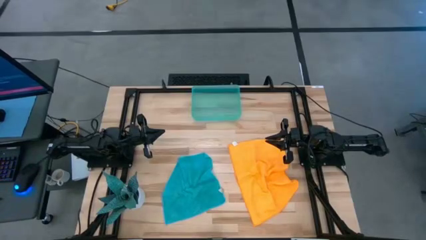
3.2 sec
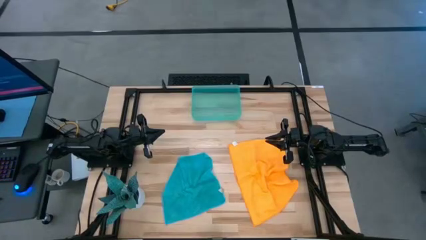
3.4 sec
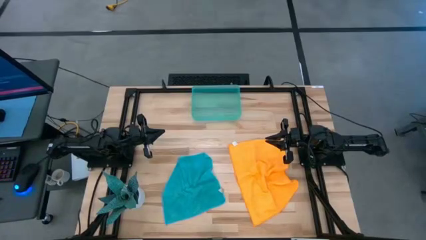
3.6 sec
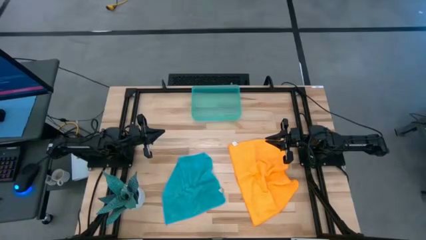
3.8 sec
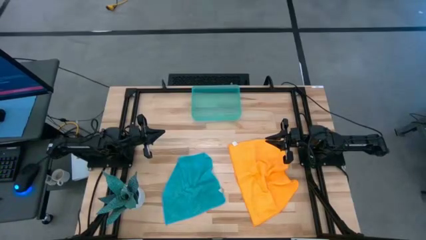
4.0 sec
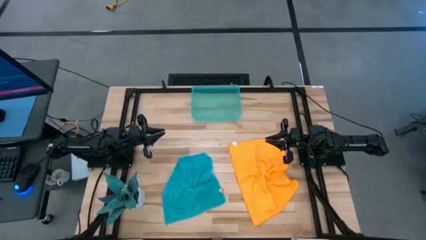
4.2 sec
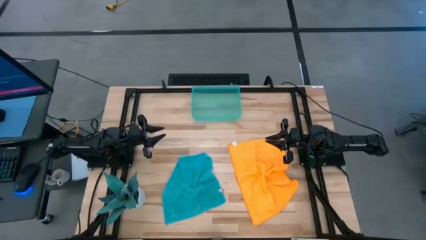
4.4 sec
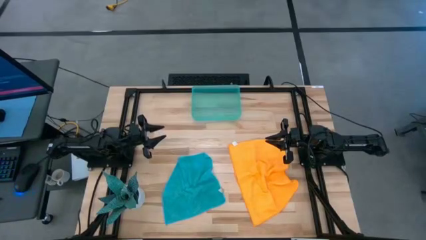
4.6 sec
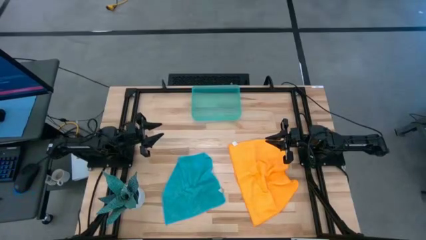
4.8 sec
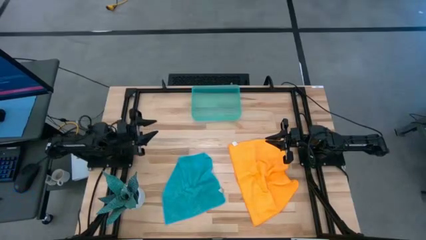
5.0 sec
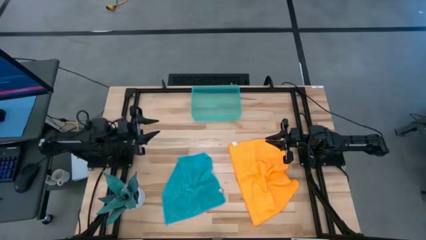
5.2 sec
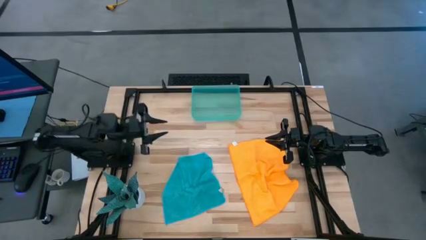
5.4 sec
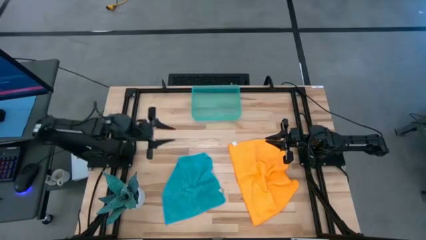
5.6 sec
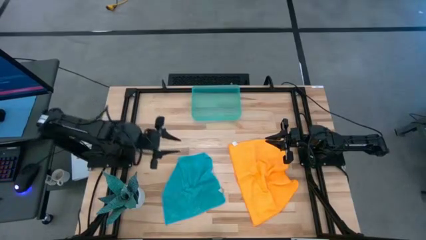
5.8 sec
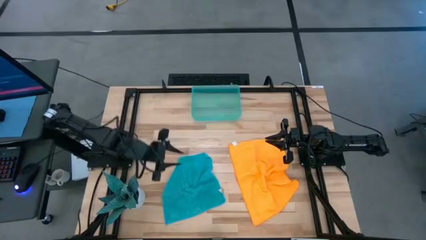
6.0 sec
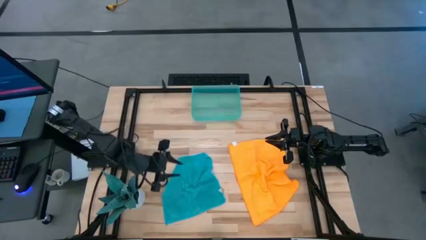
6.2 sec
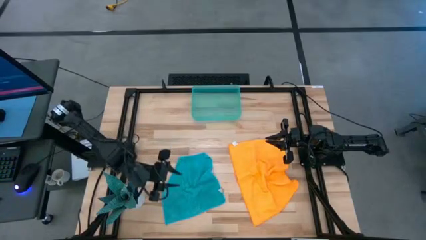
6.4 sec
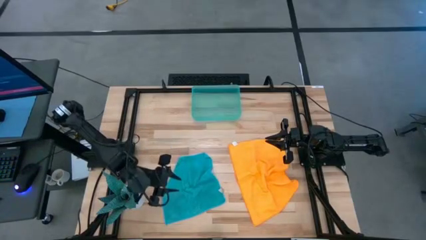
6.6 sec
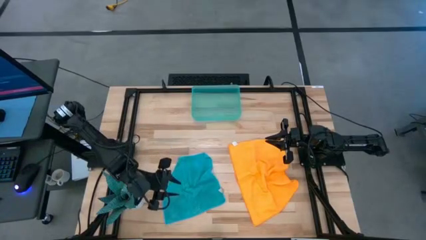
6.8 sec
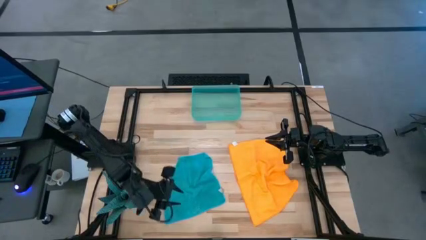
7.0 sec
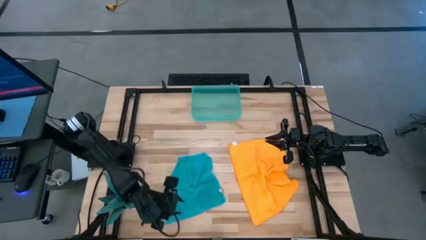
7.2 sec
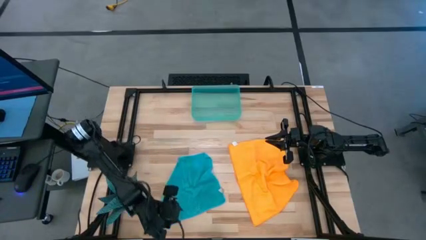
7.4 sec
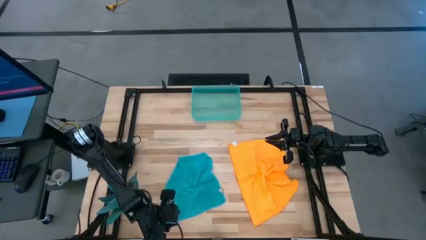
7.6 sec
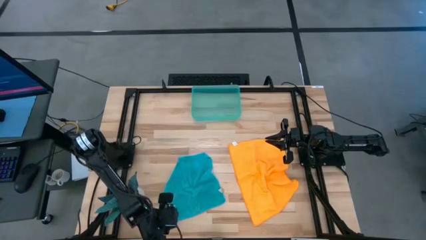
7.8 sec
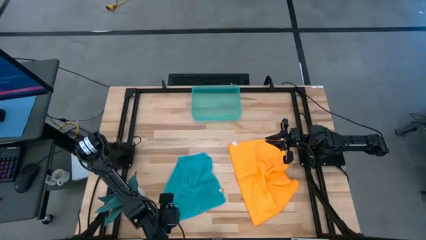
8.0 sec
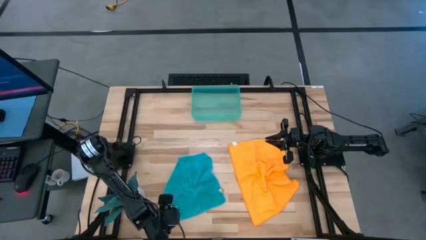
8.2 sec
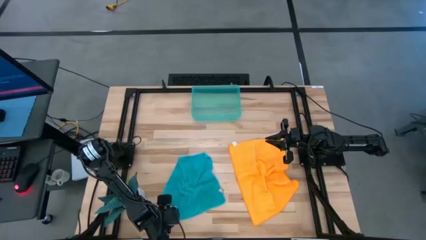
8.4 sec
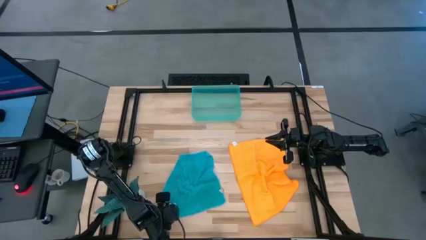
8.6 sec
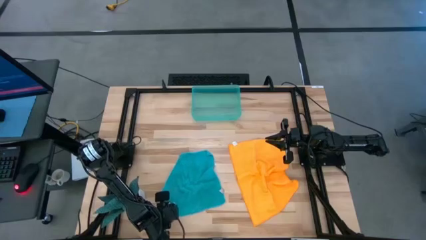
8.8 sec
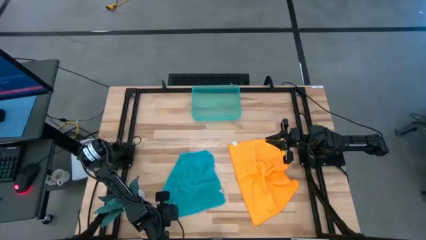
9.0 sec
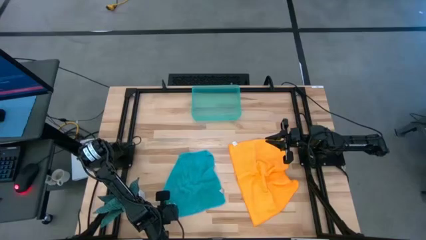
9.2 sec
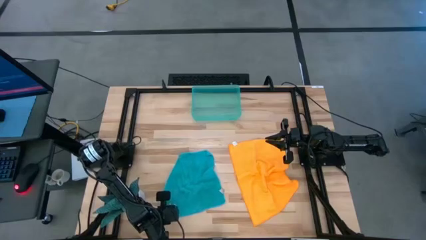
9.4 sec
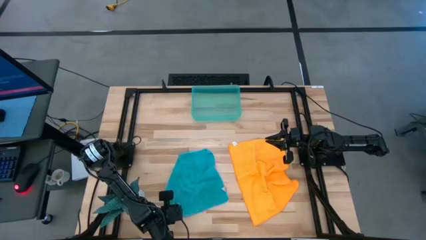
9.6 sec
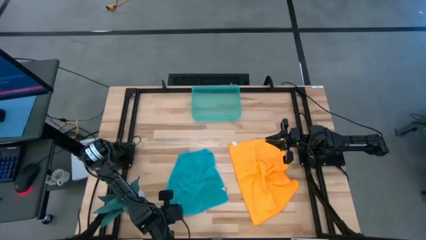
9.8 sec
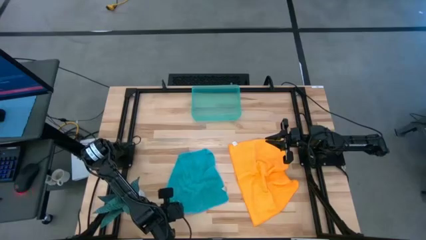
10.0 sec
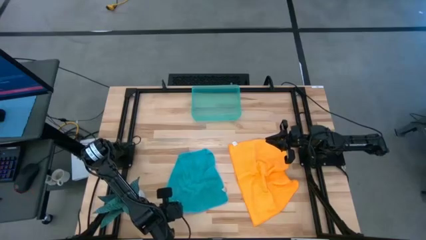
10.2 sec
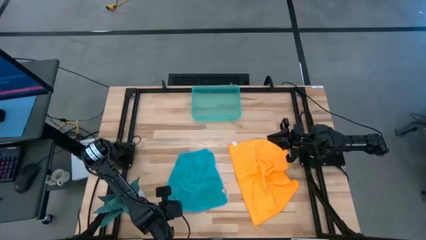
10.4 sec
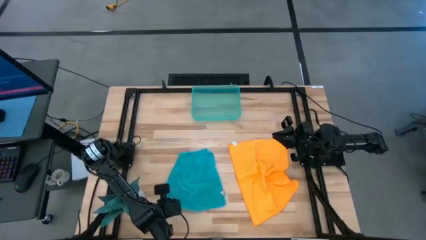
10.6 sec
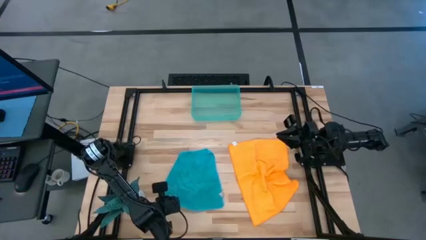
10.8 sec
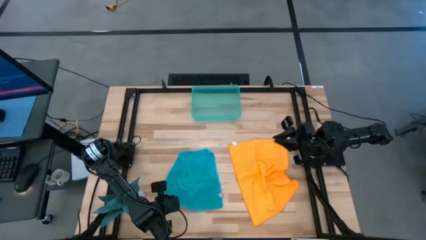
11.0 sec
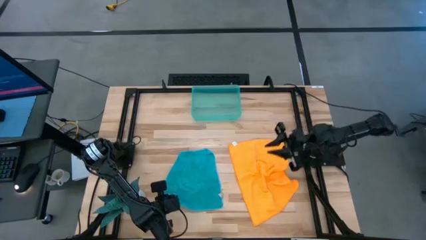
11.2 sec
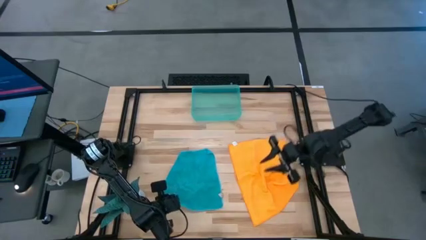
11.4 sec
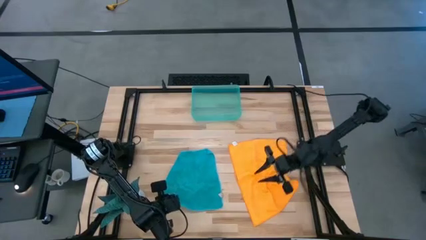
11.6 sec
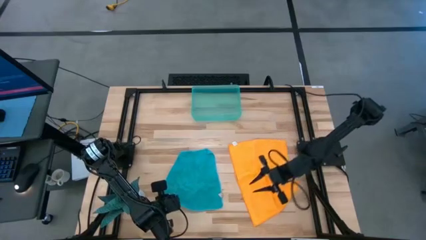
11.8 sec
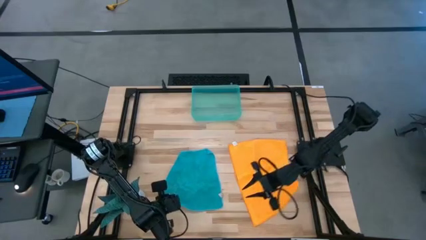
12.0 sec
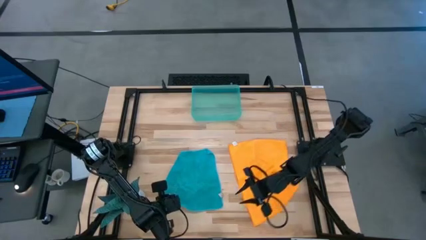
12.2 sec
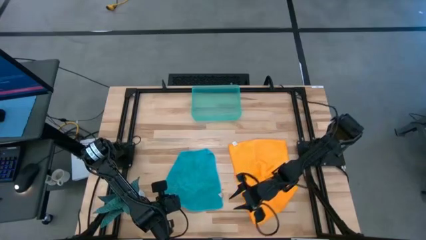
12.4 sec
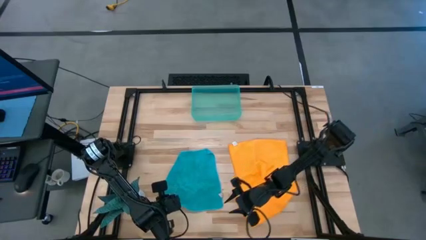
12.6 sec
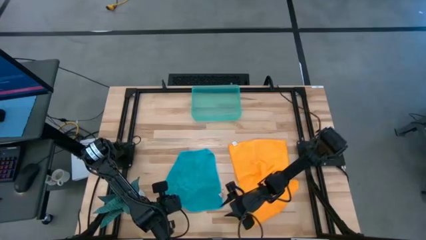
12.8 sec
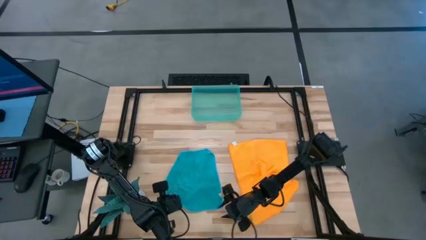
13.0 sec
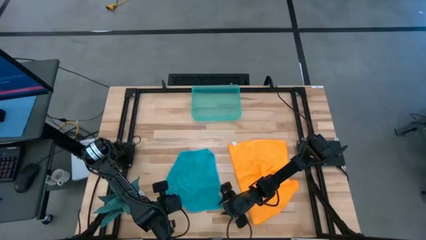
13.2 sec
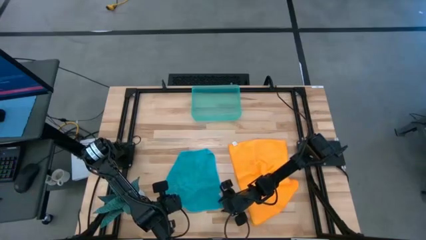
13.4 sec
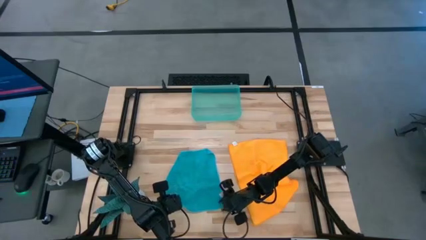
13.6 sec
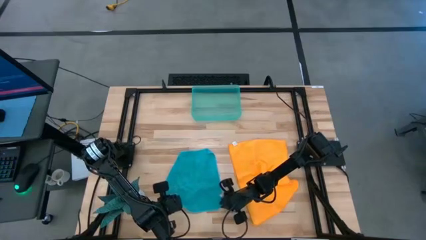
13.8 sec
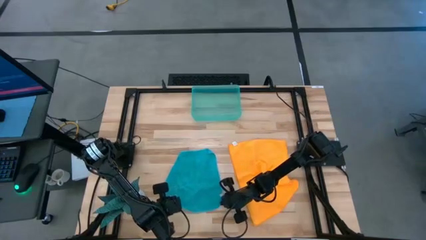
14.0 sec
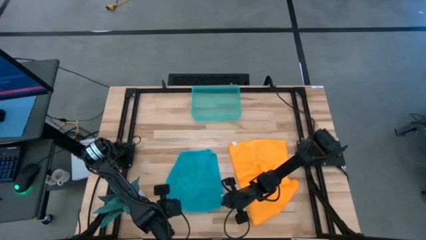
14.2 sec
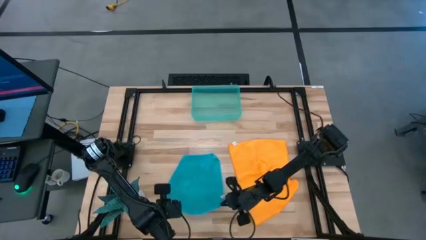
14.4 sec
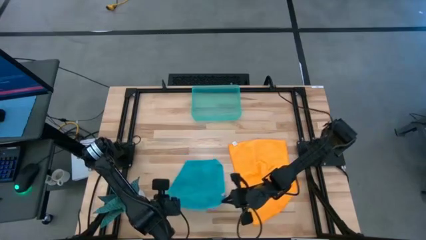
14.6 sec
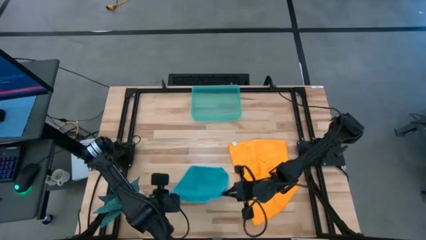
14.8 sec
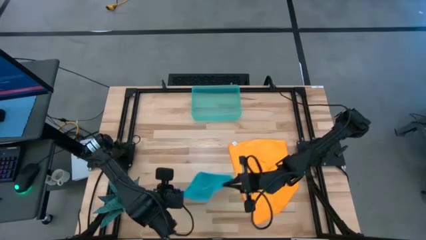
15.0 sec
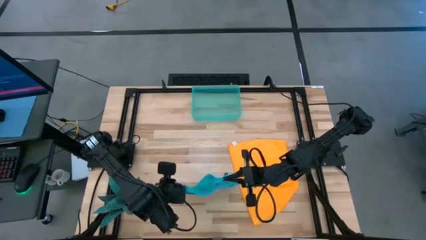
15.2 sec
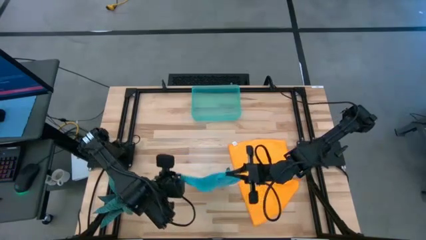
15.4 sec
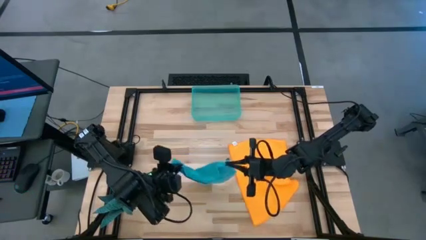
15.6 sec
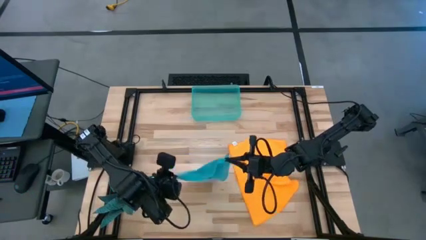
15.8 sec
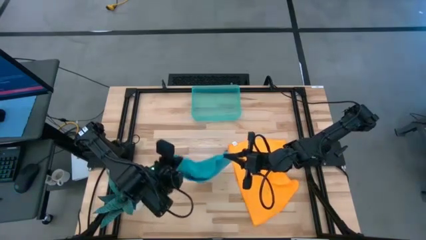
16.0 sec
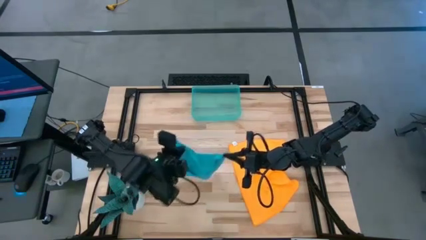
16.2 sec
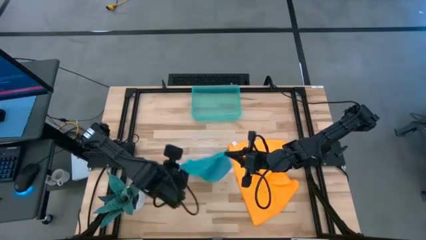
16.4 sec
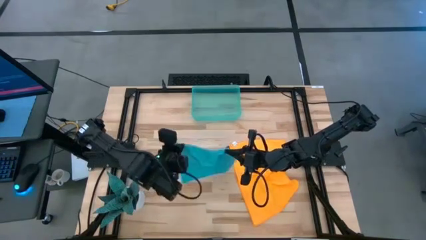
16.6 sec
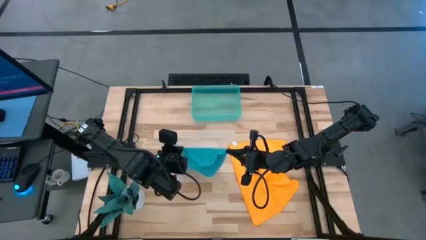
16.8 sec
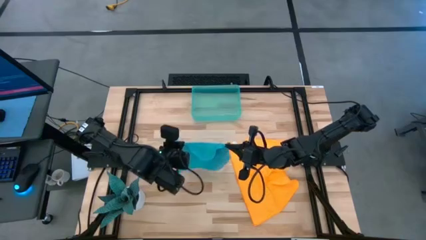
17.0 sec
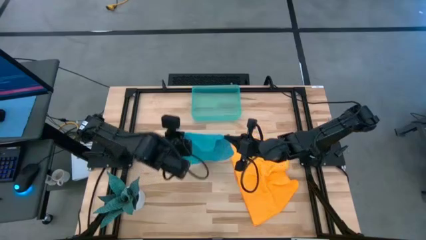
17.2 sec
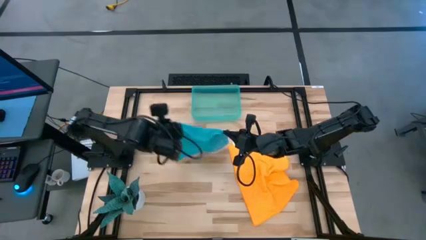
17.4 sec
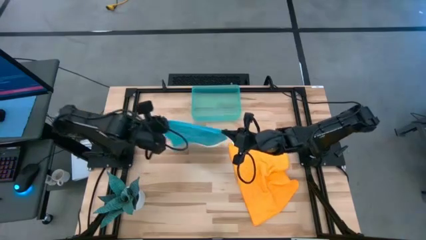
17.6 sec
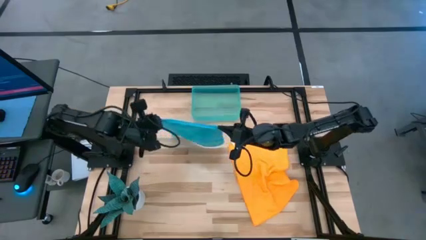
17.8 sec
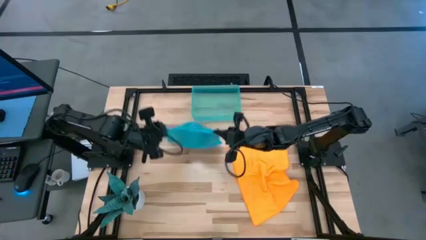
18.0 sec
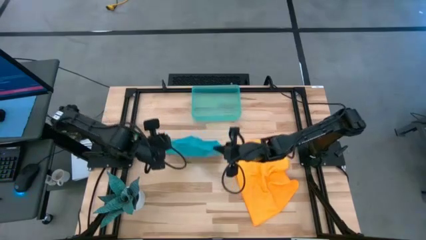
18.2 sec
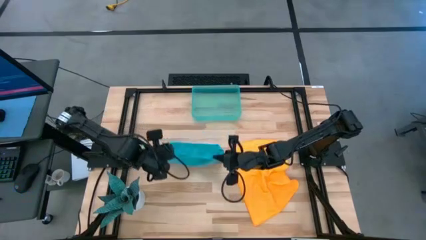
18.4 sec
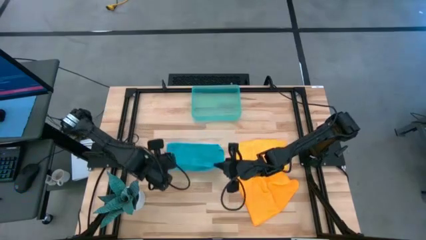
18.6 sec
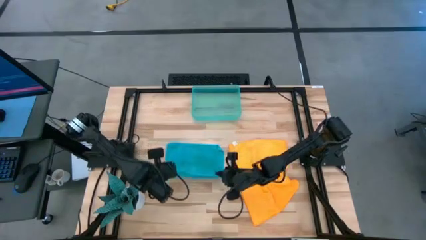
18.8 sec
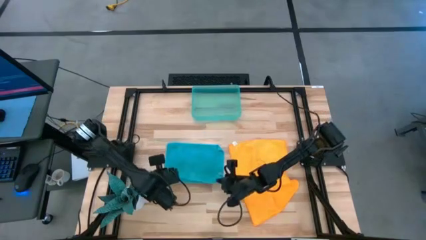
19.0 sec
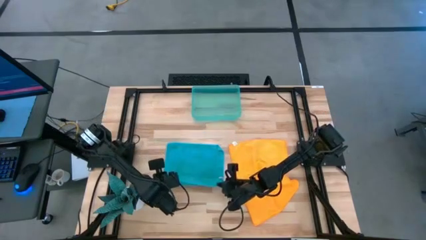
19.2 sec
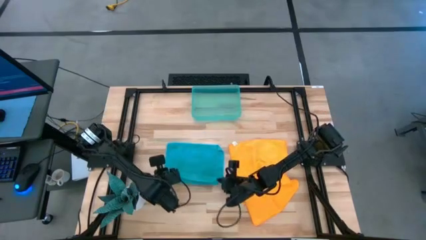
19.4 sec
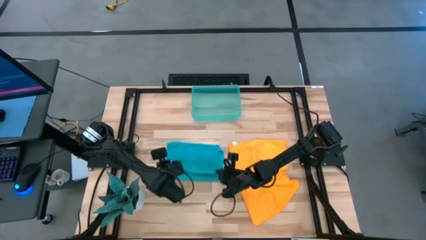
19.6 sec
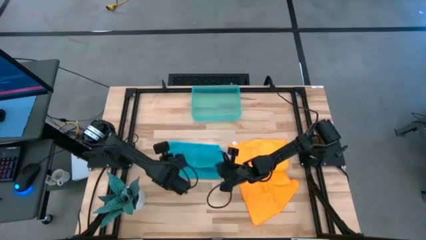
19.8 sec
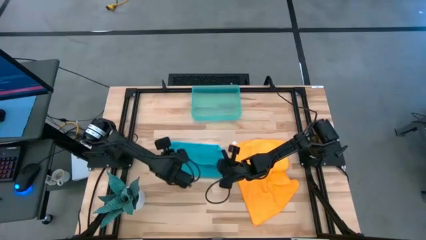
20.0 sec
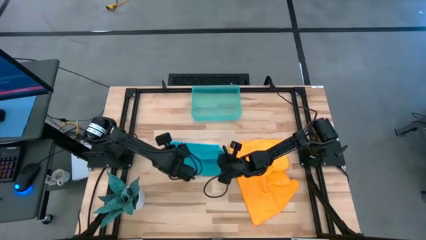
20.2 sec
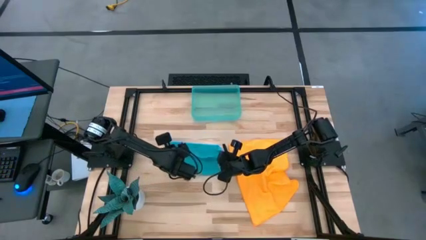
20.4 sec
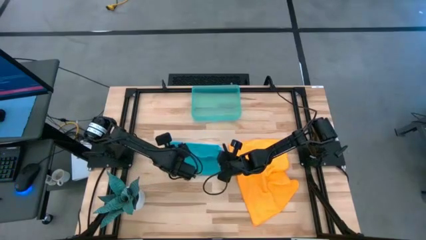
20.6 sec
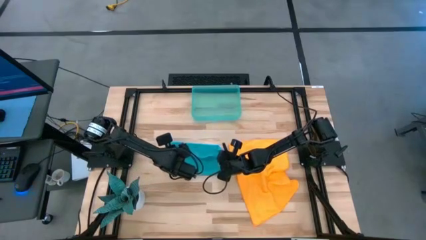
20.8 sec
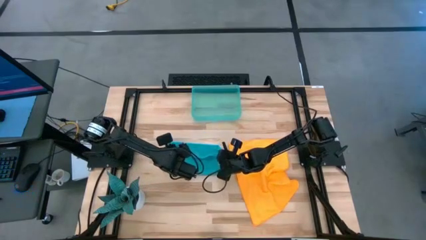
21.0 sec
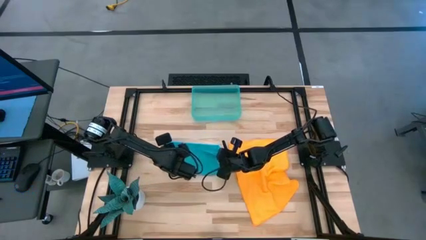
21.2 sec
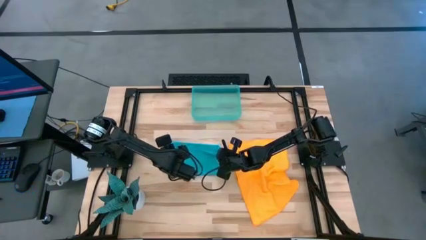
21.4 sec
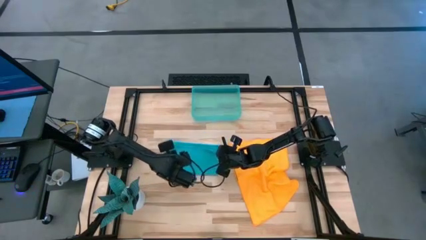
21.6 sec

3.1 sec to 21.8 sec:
Task: Roll microfiber towels into tight, uniform cylinder then place into a basket
Fold the blue microfiber cloth
